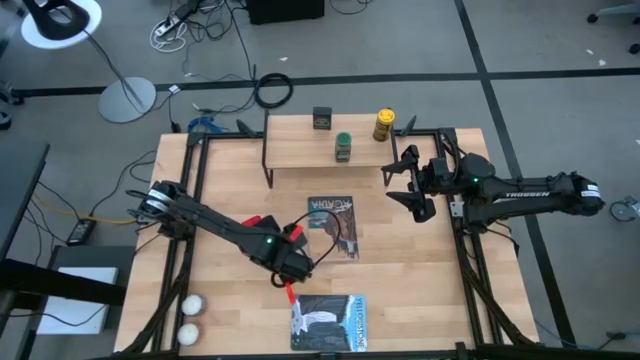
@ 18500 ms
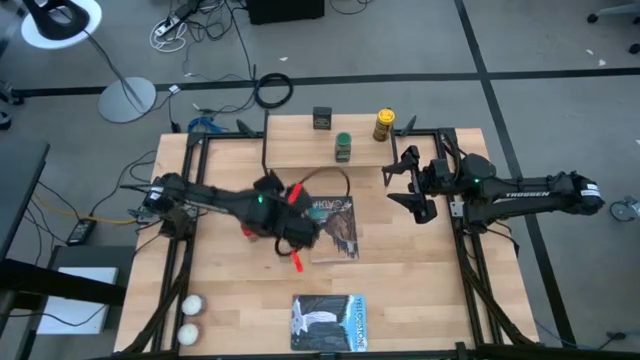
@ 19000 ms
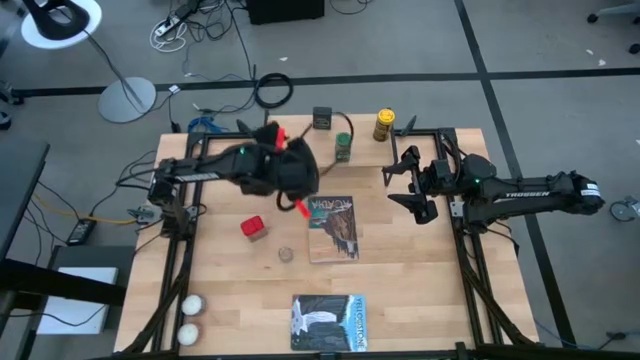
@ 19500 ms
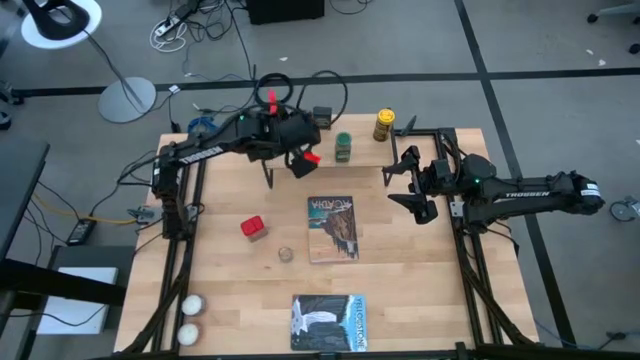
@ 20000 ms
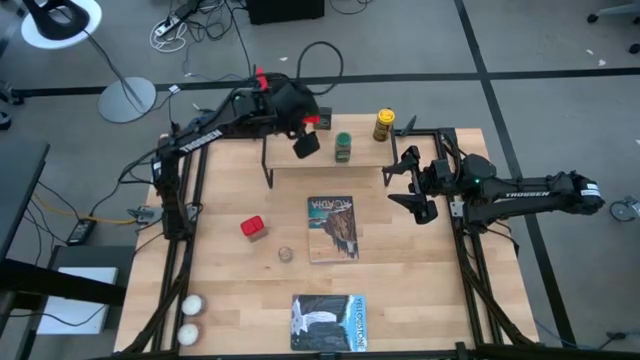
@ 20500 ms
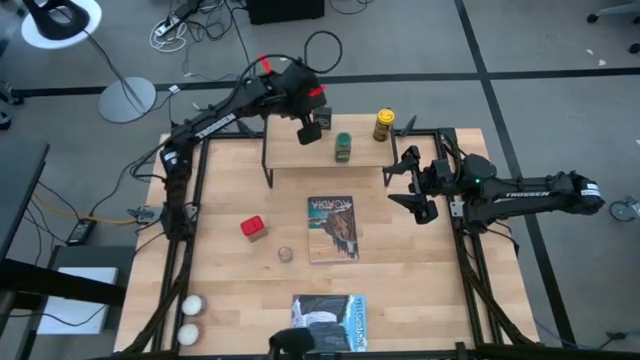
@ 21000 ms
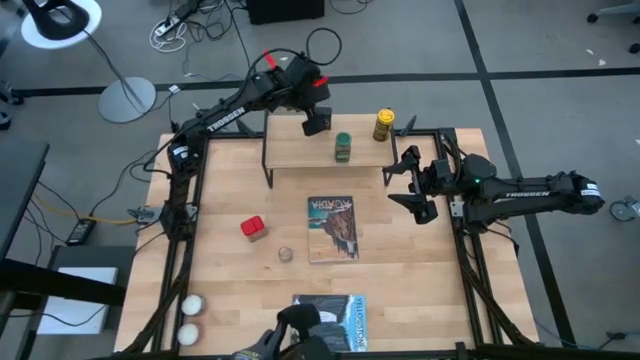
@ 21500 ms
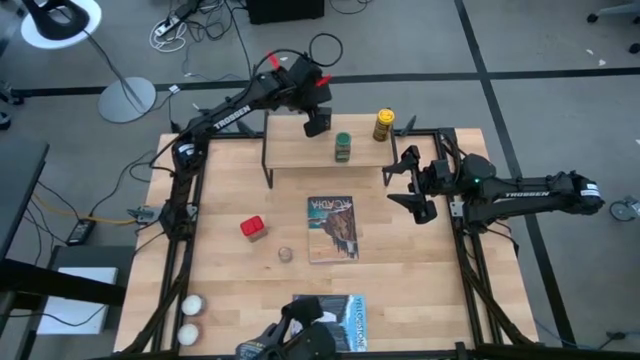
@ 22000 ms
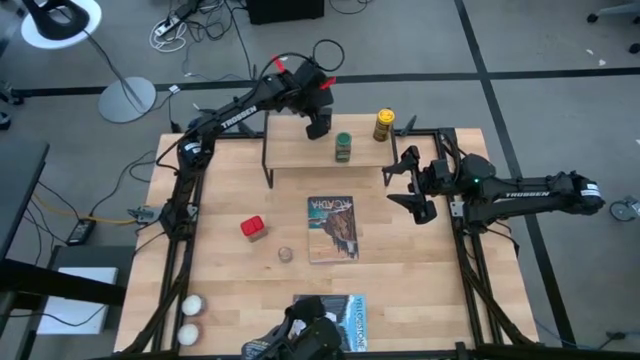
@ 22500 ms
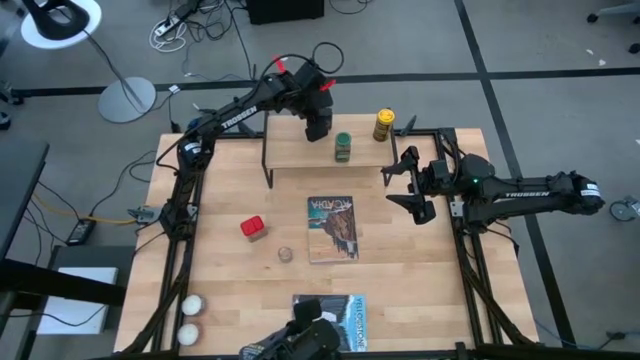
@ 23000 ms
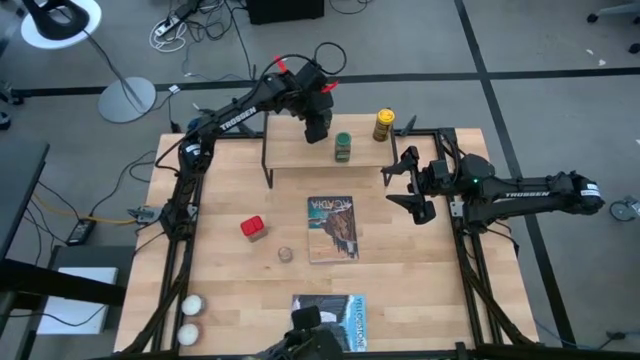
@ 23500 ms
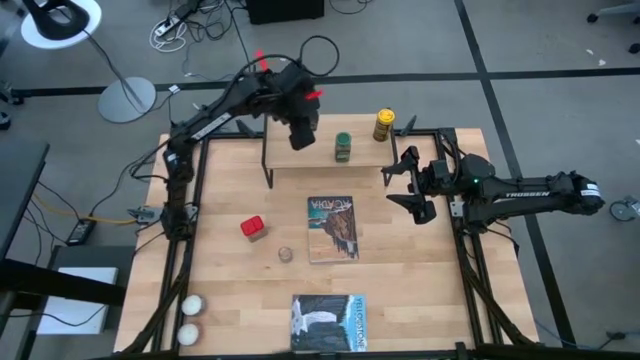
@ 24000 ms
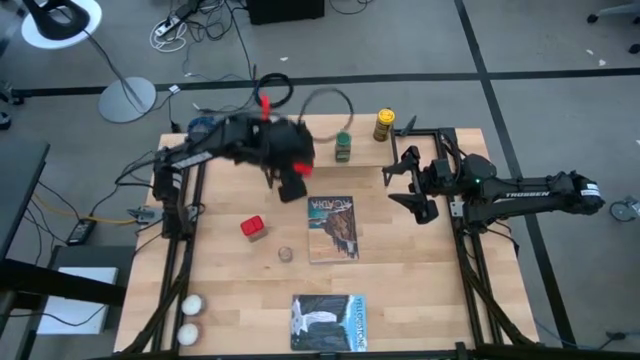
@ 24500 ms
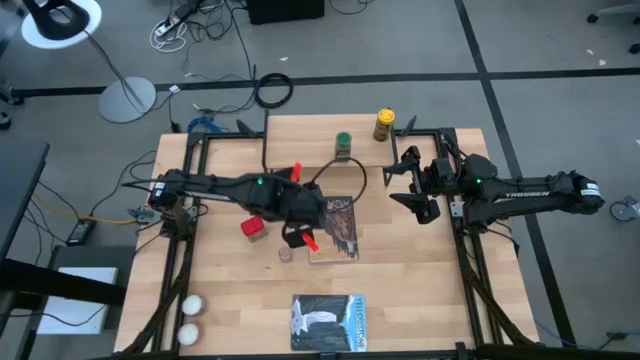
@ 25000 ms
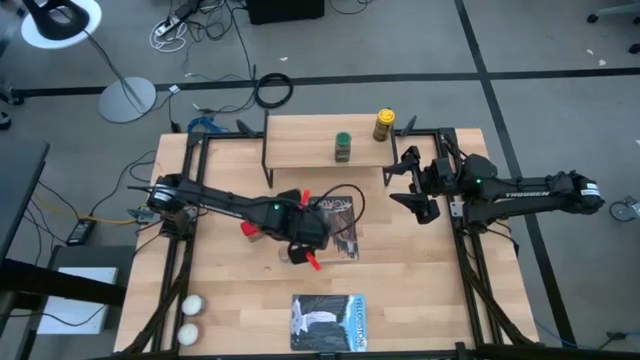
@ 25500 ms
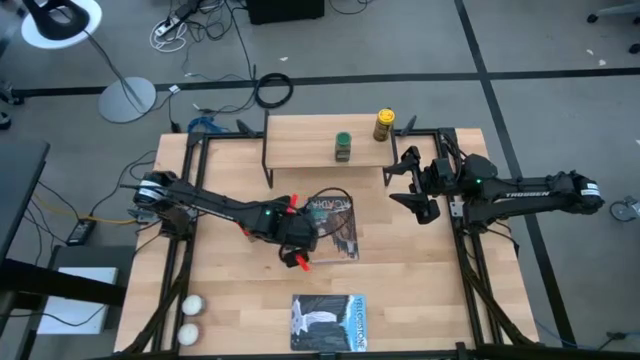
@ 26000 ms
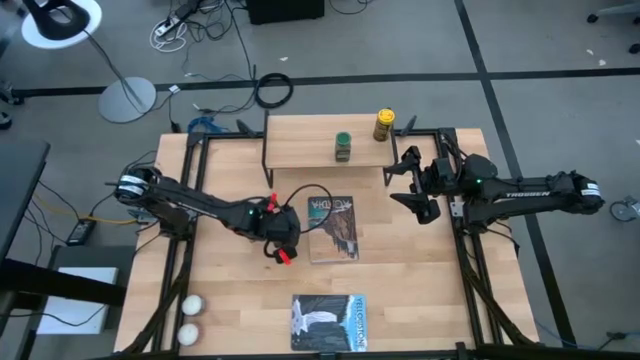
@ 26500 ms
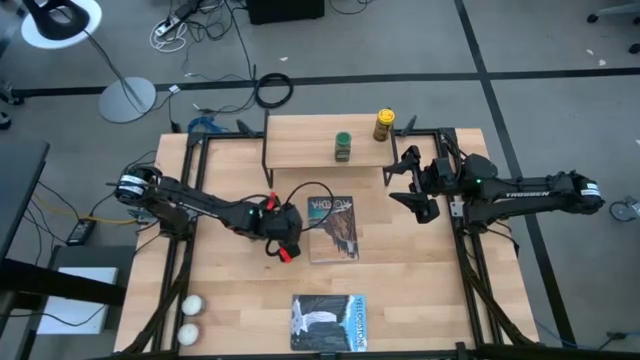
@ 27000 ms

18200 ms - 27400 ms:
Task: Shelf spices
Remove the black seasoning can on the shelf

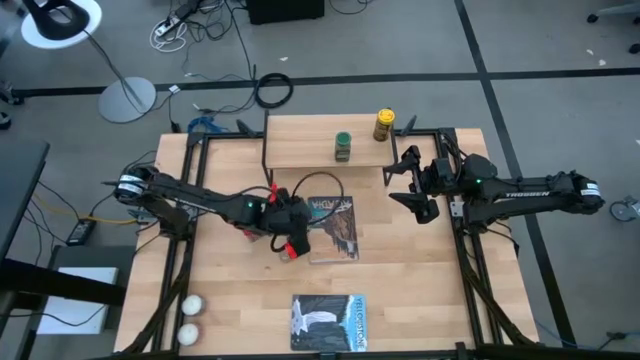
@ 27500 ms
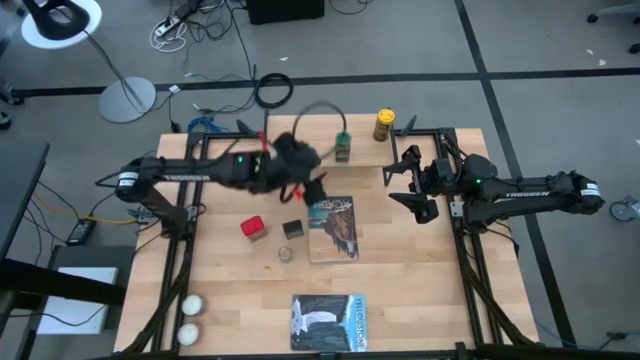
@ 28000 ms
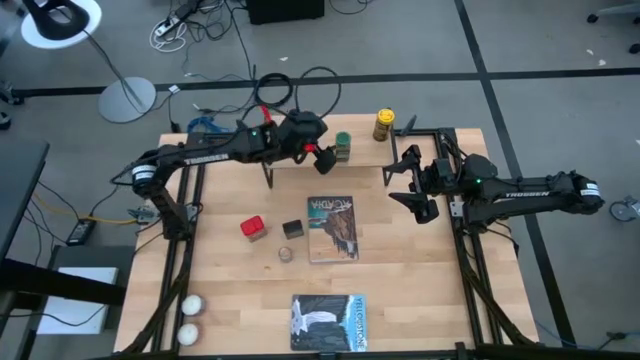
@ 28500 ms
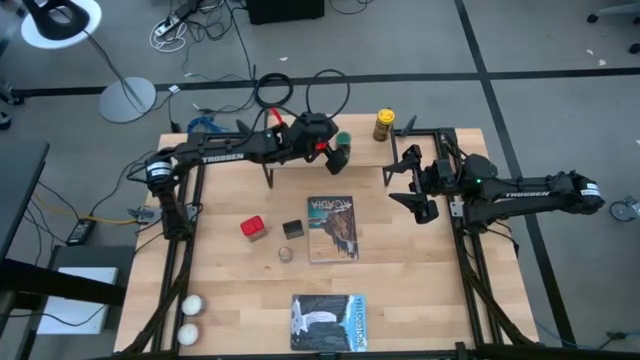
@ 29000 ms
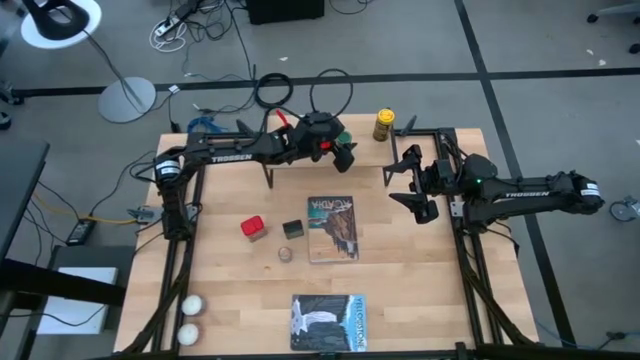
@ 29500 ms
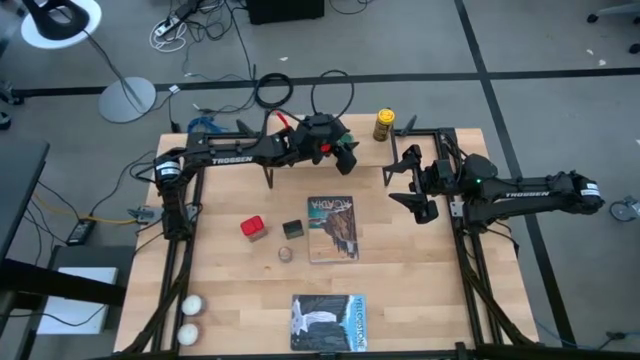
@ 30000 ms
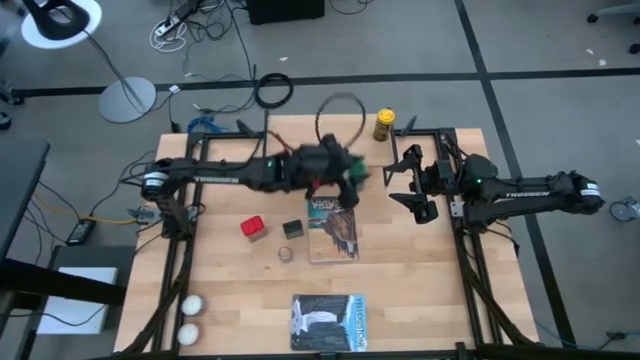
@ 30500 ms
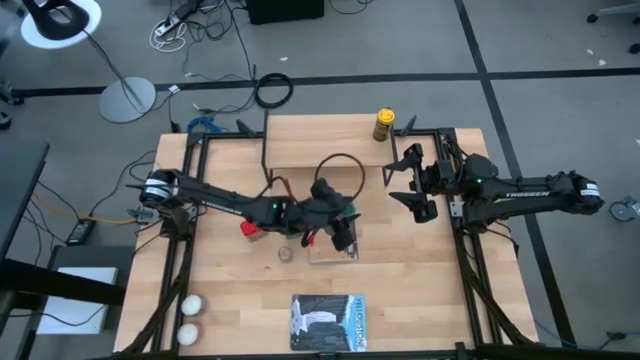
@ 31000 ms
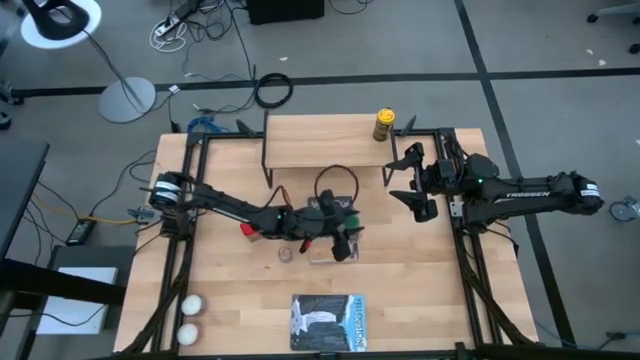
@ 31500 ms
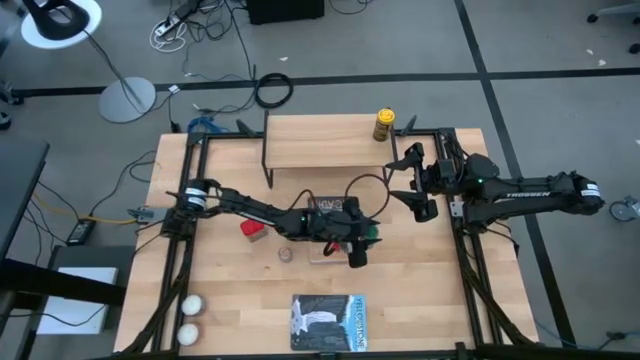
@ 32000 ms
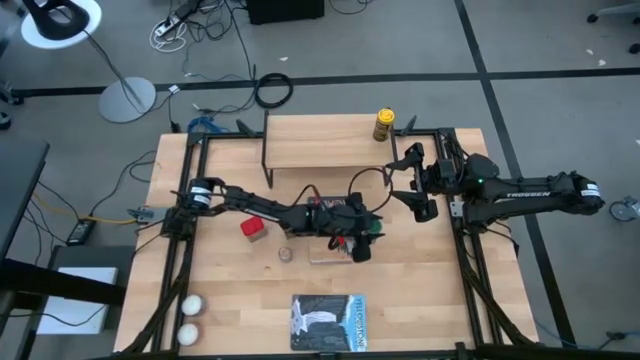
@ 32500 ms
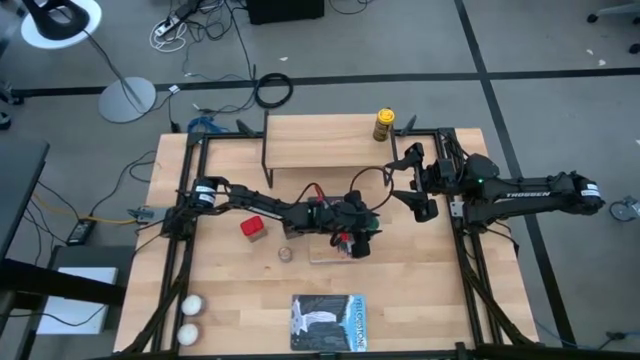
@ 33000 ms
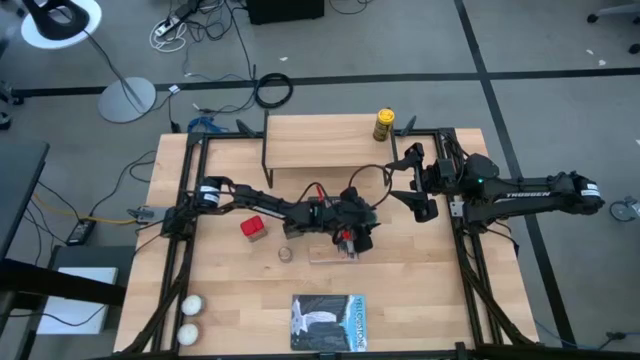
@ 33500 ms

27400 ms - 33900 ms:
Remove the green seasoning bottle on the shelf

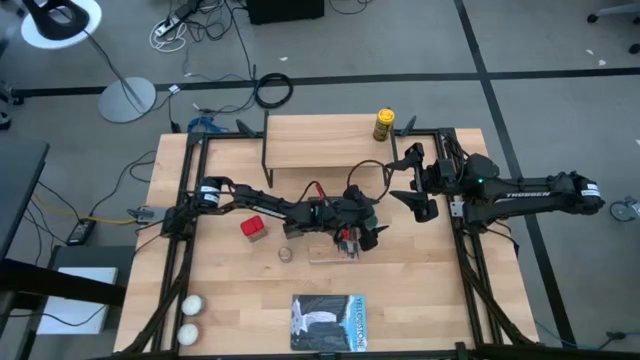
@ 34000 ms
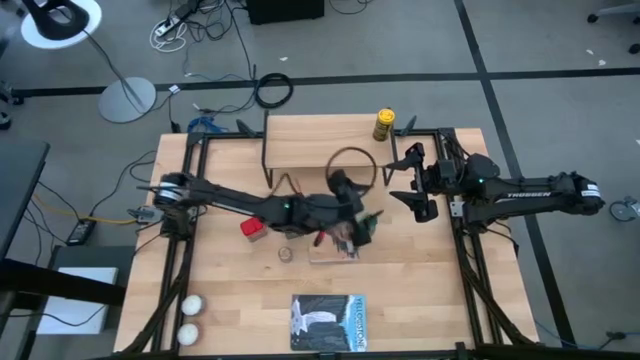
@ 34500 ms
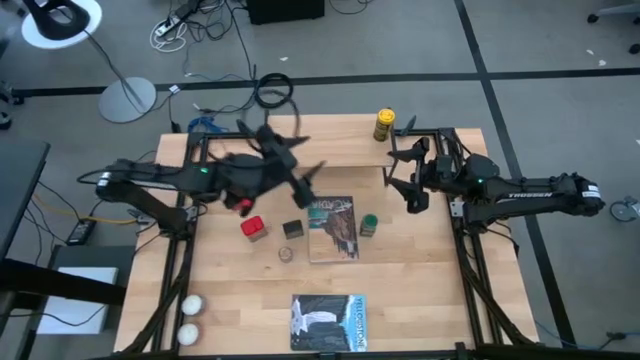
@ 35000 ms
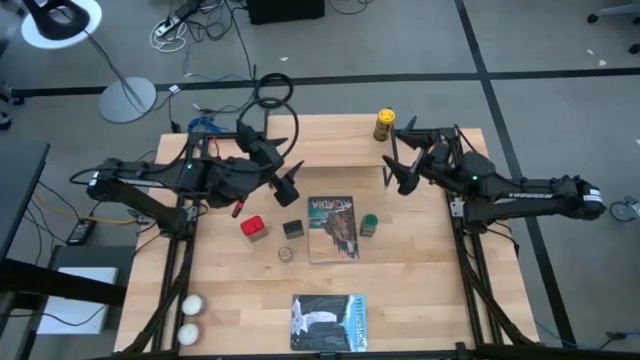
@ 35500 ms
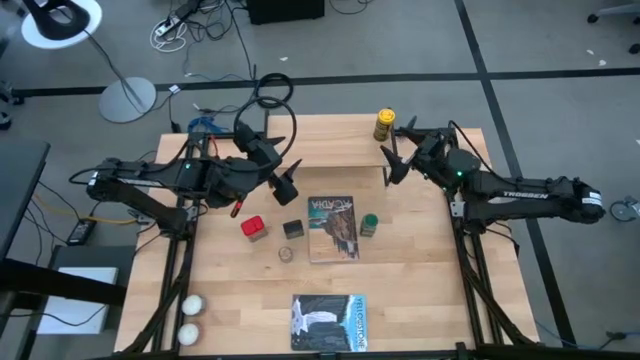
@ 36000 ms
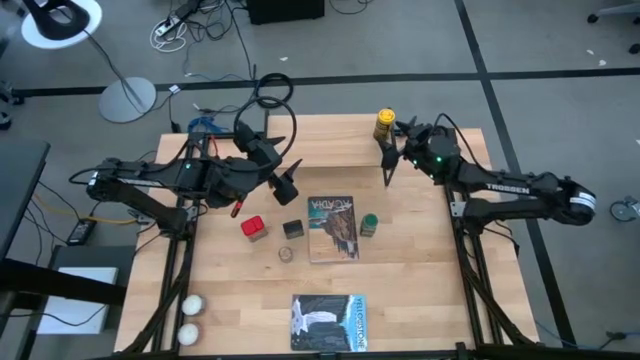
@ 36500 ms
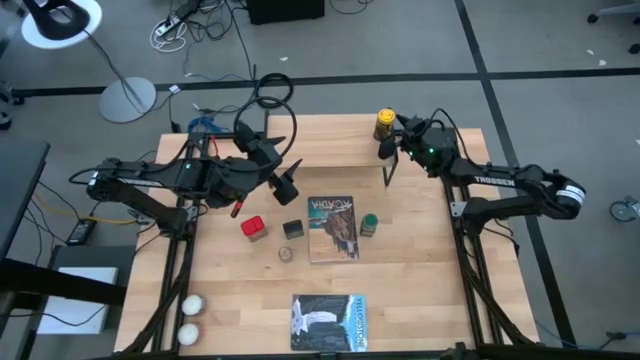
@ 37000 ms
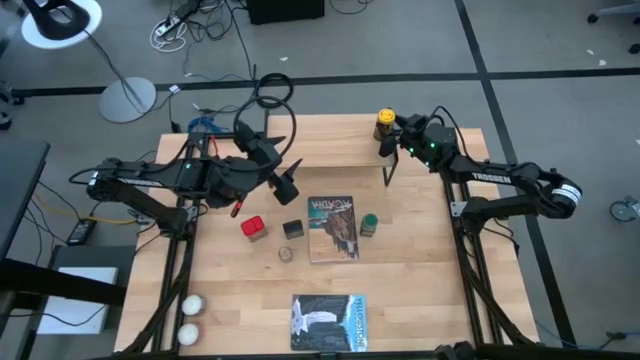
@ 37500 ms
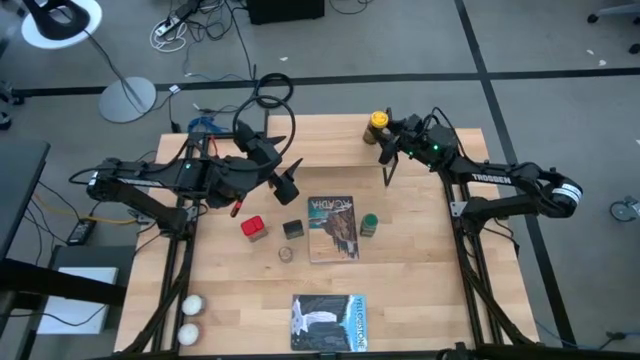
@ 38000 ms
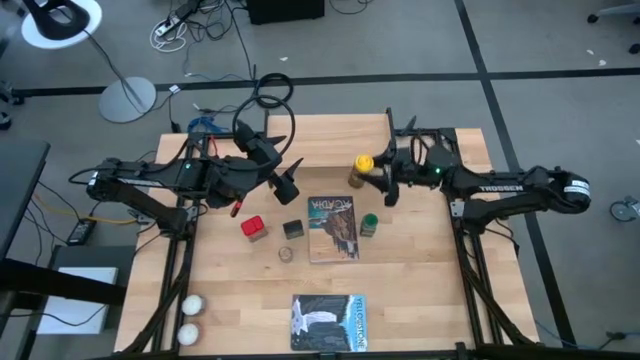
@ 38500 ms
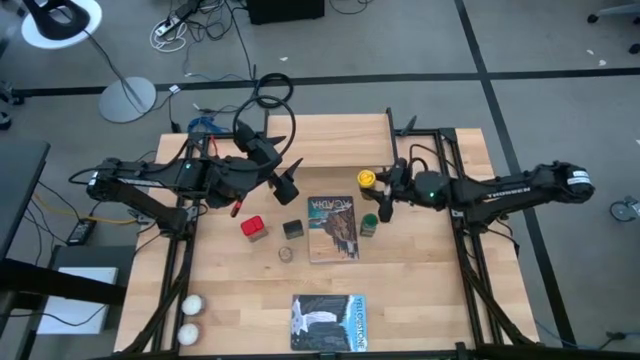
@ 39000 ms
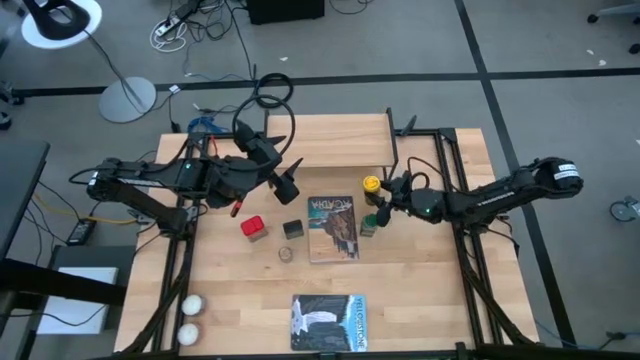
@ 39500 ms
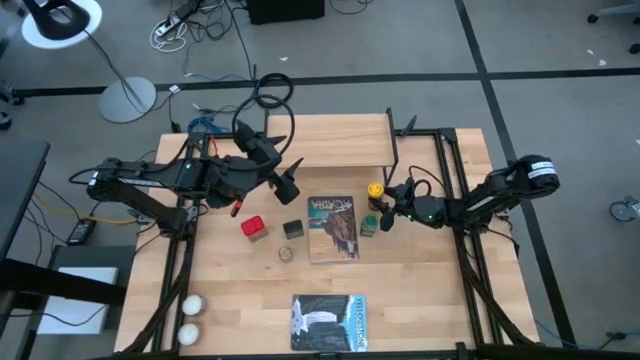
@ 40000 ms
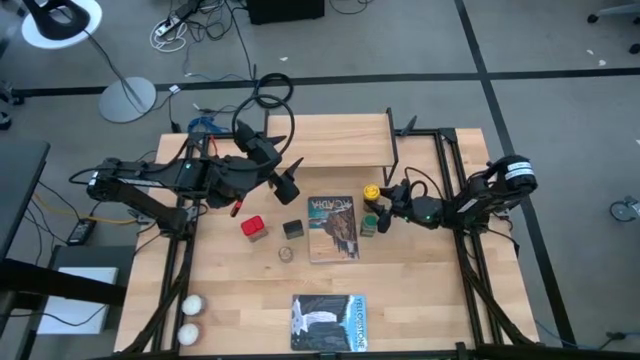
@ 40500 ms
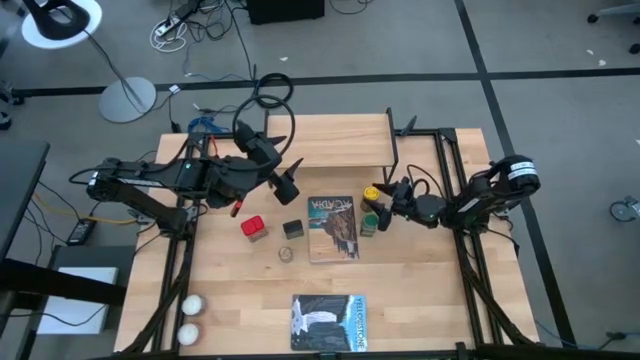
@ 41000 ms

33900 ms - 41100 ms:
Remove the yellow seasoning bottle on the shelf
